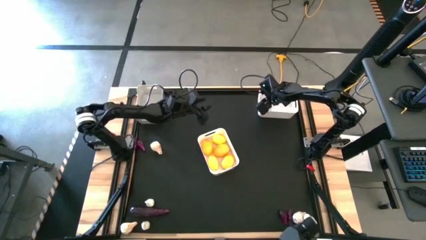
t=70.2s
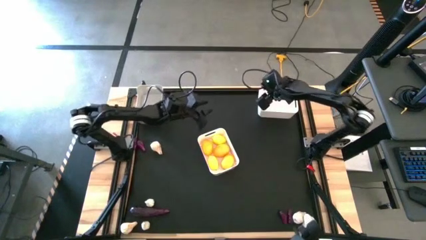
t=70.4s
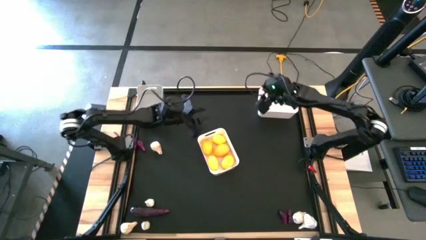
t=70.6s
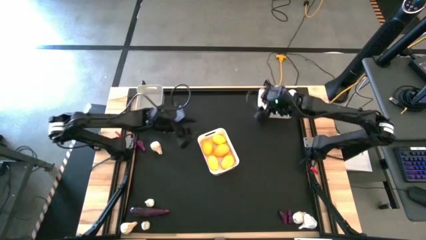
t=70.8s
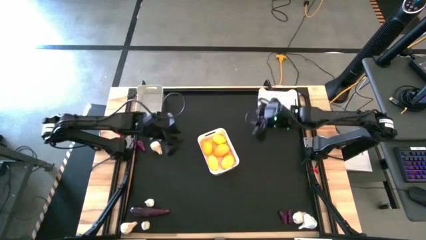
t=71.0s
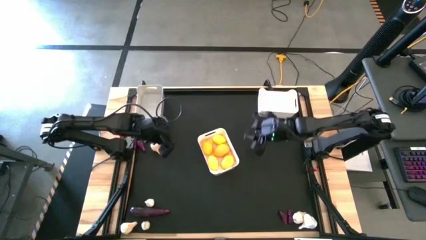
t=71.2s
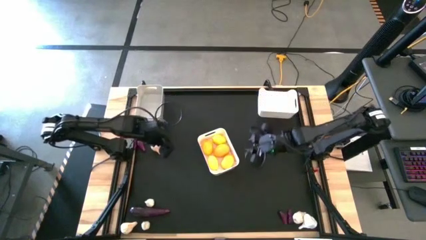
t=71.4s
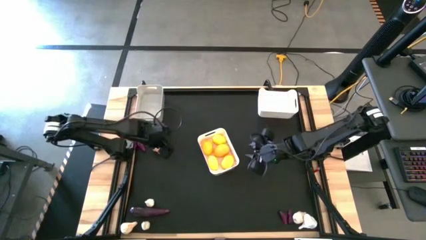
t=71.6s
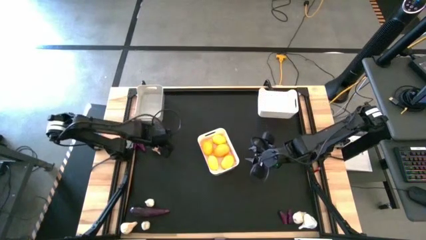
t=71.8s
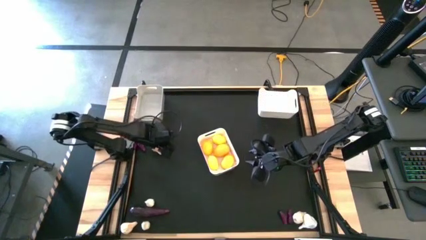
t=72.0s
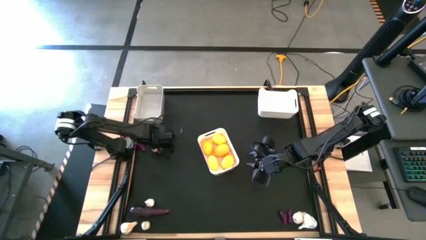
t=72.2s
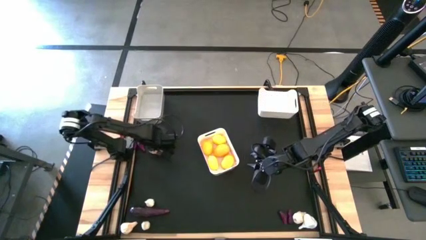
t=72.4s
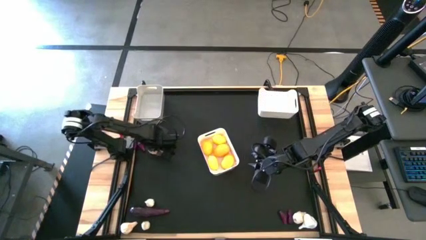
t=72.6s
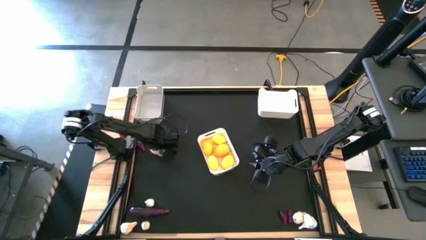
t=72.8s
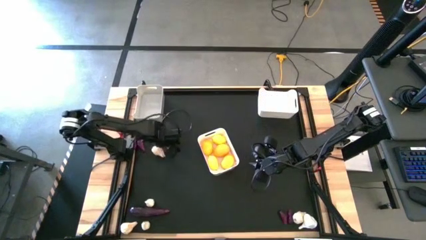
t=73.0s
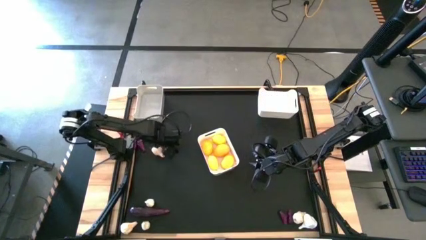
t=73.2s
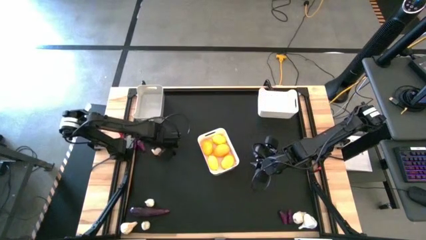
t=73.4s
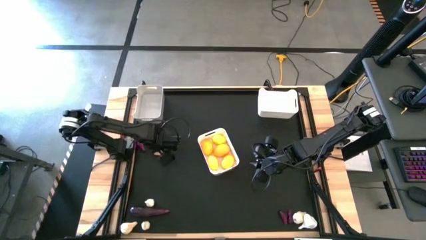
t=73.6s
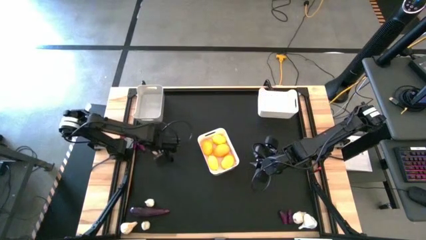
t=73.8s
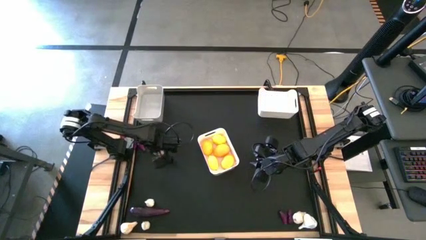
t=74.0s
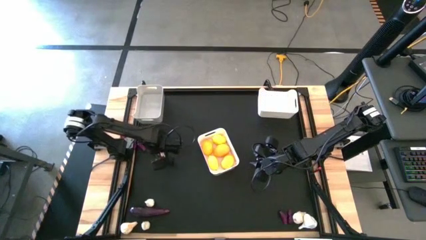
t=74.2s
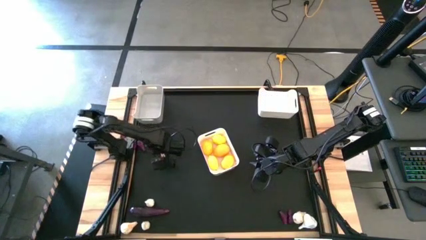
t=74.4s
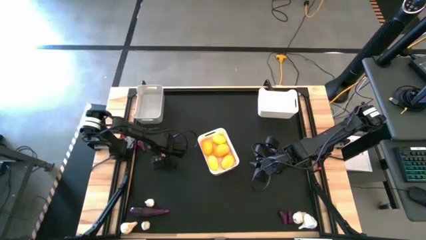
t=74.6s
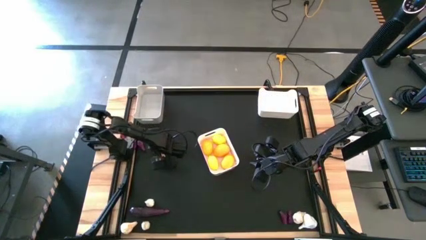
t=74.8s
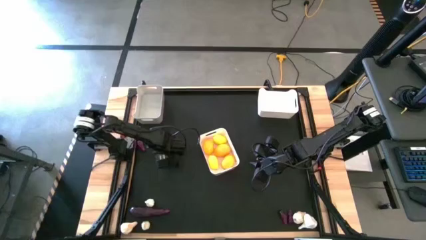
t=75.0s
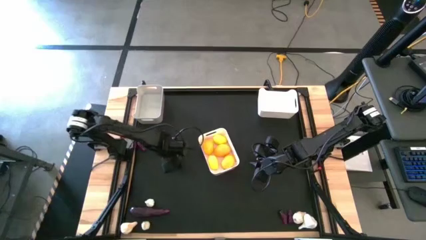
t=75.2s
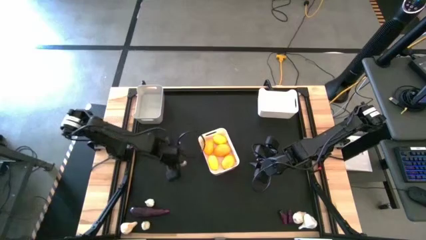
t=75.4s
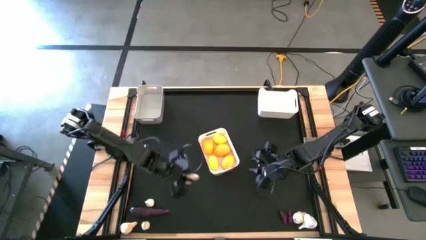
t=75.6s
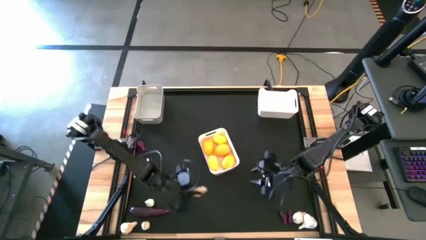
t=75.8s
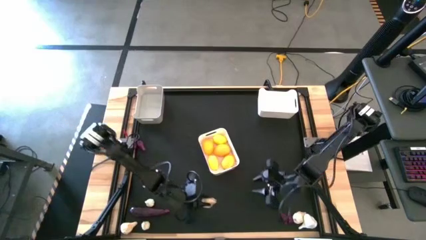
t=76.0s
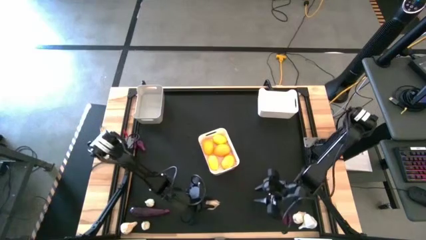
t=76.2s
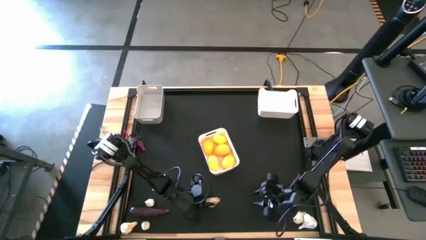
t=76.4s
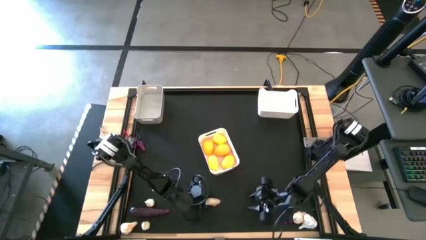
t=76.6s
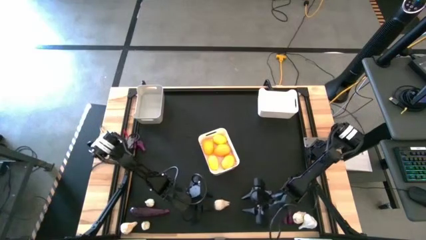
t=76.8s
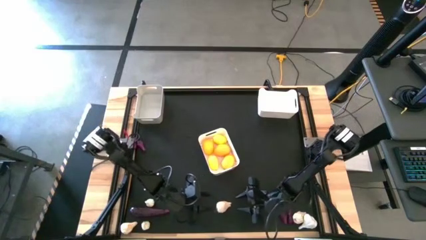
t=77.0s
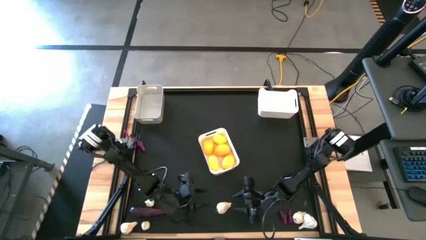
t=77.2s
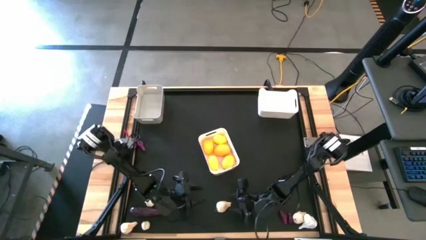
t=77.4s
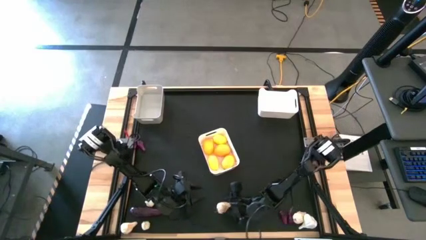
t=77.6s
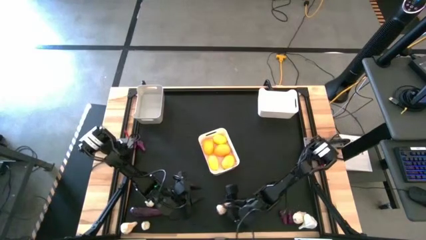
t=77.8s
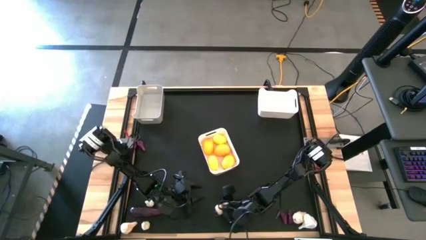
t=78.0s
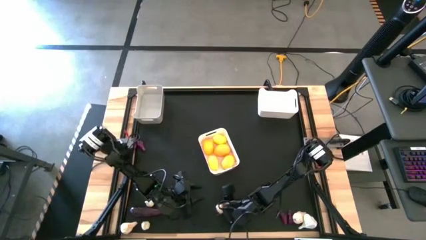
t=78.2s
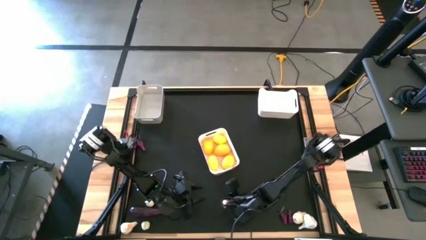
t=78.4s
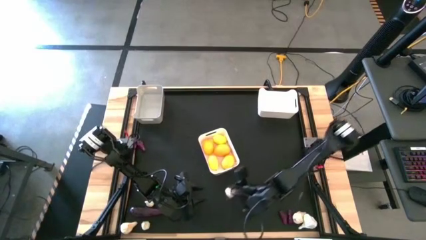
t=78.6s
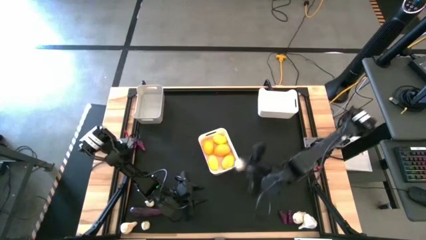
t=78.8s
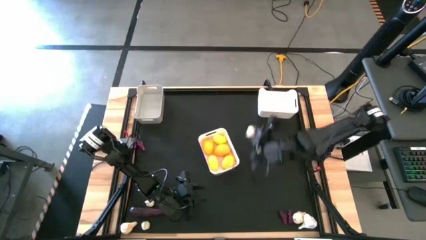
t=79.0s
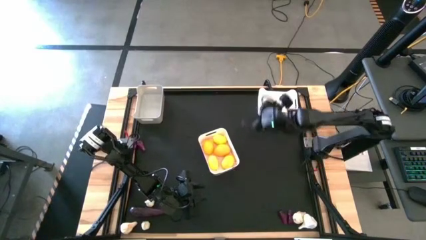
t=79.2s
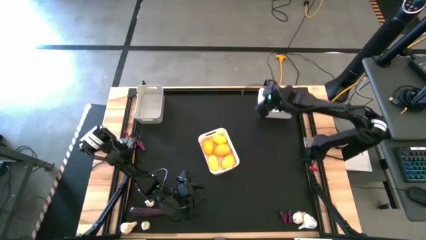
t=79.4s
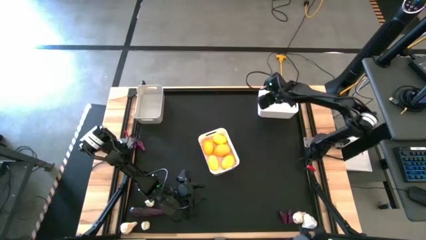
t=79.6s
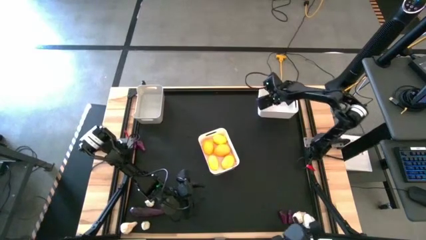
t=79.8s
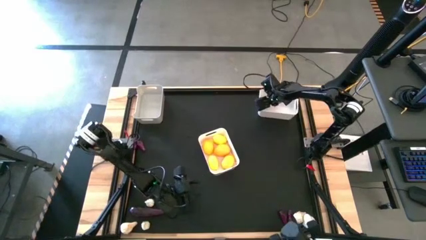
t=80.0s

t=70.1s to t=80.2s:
Task: Sort produce into baskets
Put the garlic into the top white bin

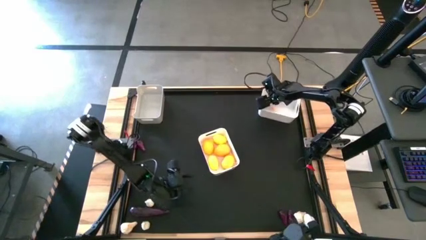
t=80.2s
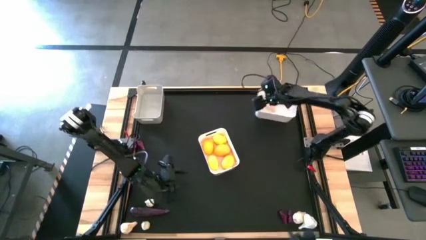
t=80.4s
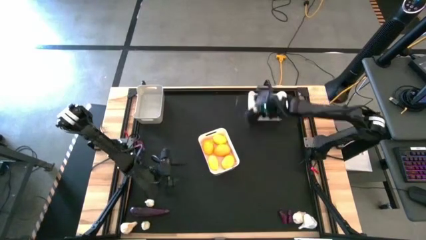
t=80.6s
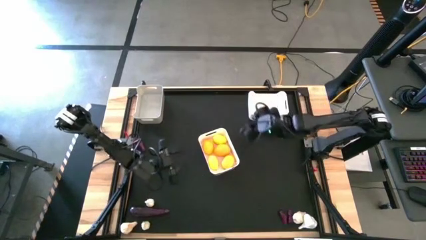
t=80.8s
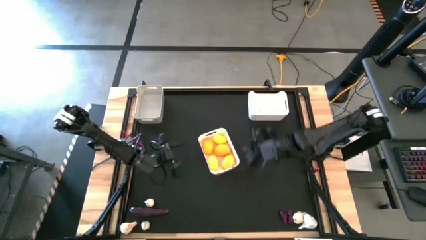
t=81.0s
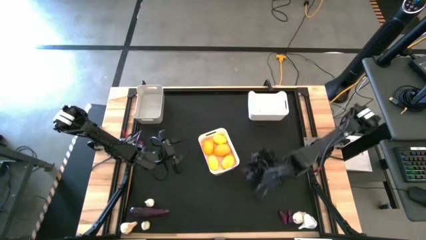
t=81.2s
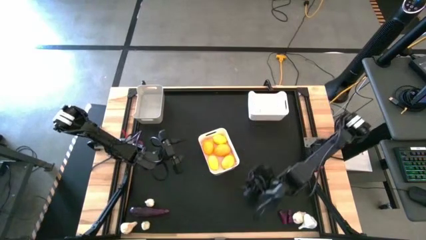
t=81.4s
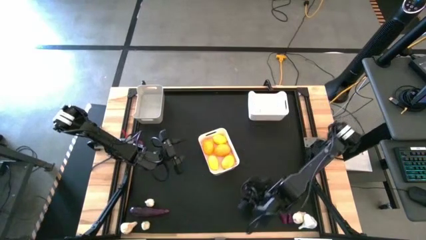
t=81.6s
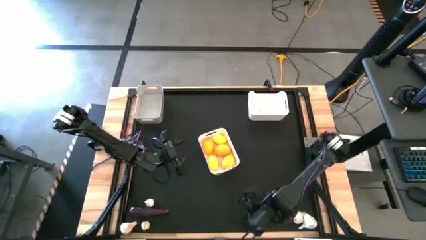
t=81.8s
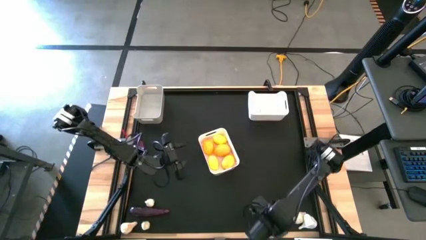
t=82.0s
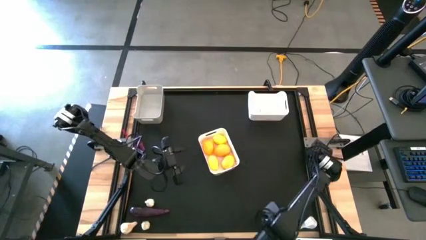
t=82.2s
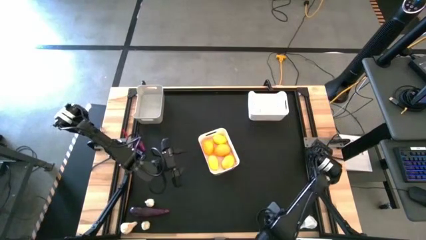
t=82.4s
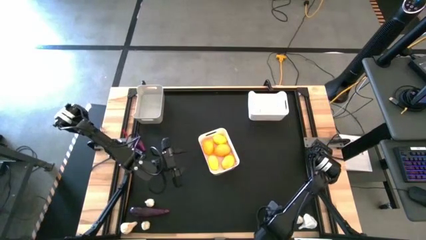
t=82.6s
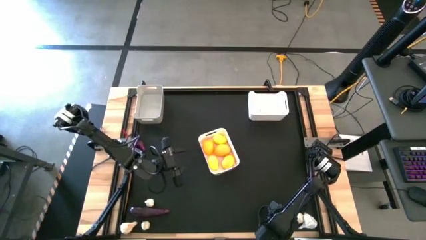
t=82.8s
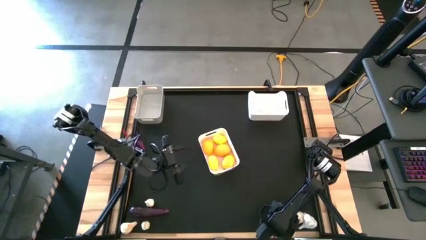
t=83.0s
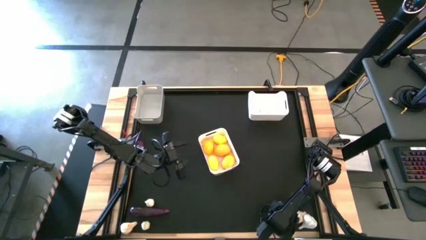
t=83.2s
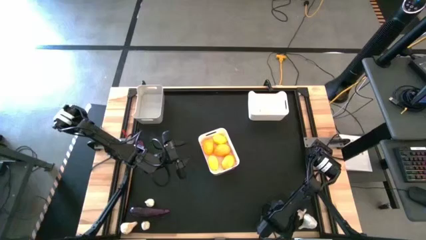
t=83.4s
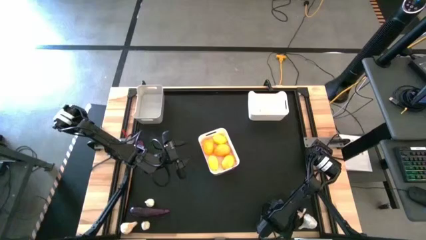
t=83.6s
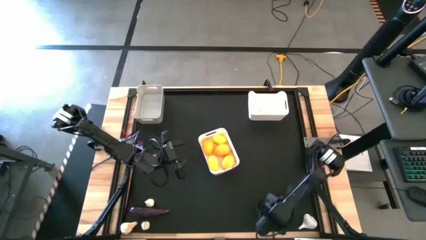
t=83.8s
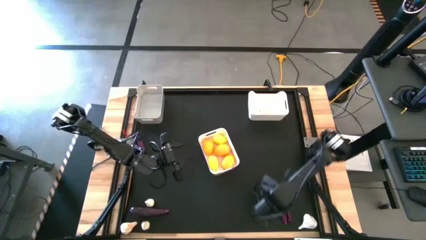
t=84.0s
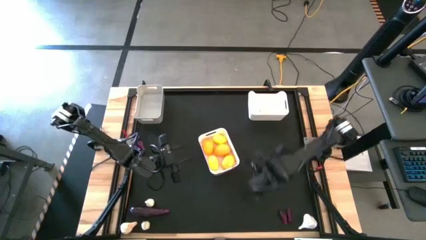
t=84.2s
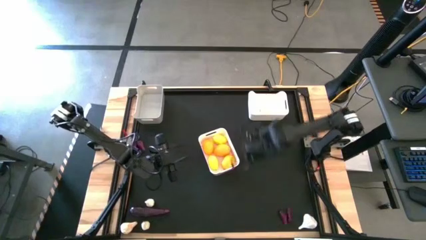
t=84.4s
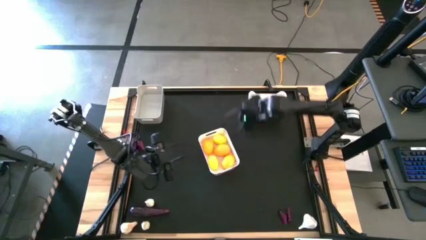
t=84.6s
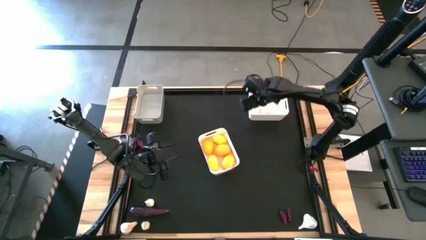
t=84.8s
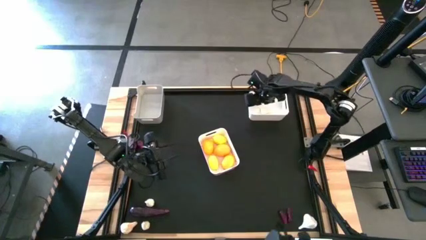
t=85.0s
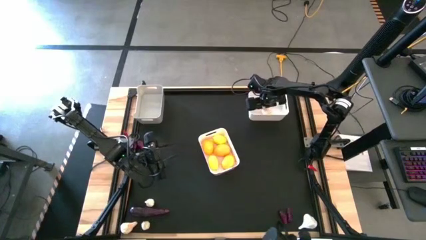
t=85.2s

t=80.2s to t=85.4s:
Put the garlic into the top white bin

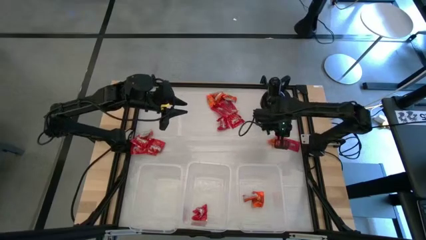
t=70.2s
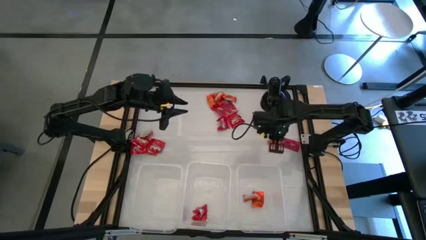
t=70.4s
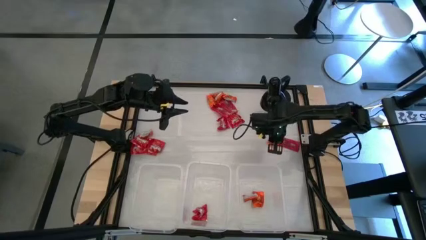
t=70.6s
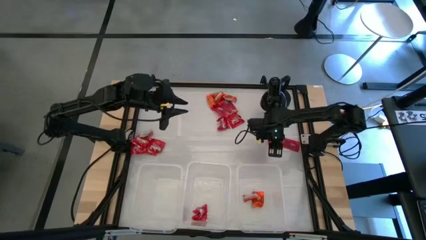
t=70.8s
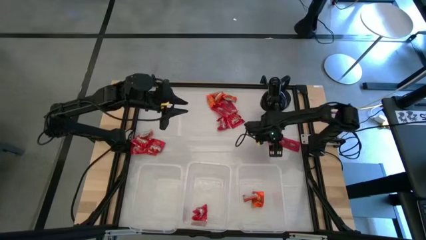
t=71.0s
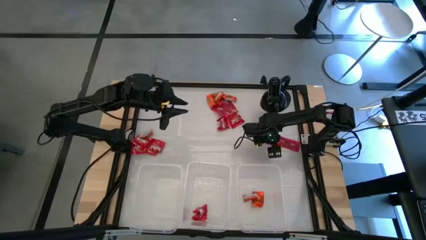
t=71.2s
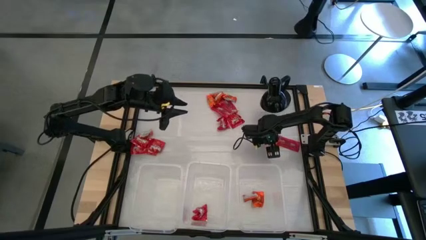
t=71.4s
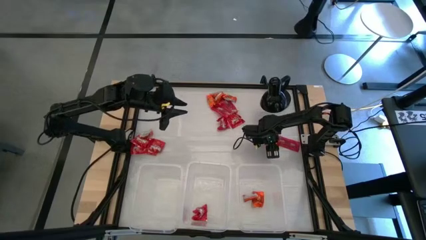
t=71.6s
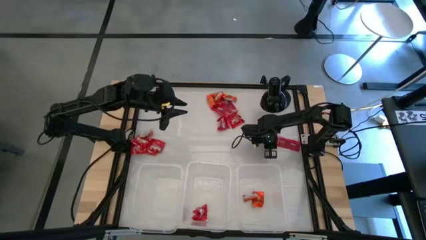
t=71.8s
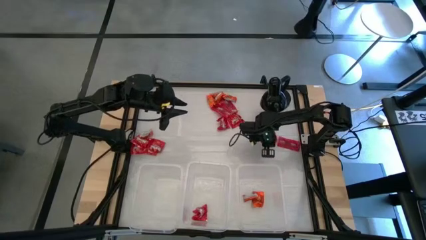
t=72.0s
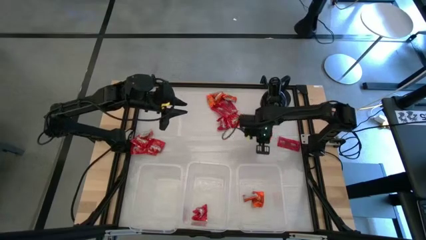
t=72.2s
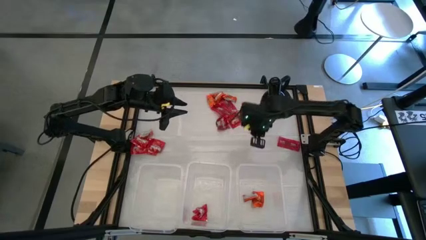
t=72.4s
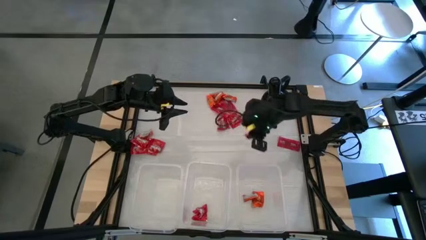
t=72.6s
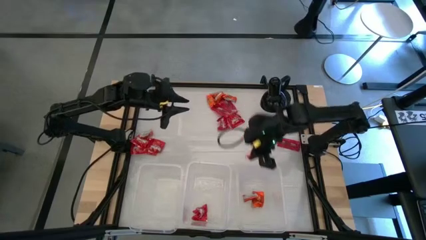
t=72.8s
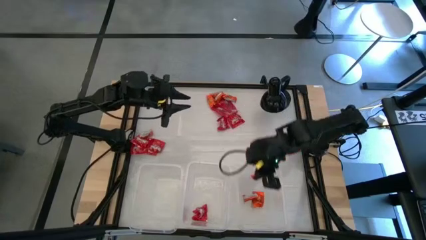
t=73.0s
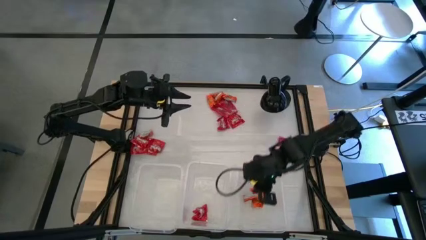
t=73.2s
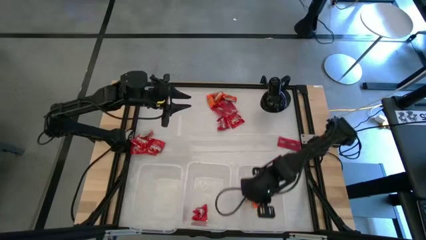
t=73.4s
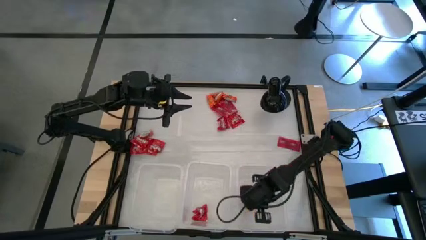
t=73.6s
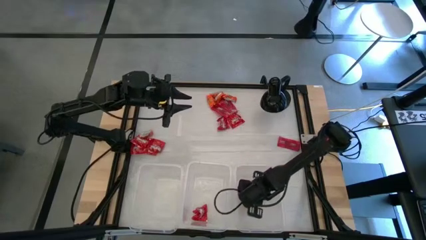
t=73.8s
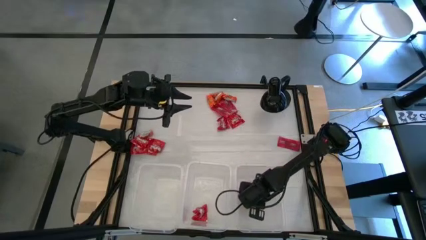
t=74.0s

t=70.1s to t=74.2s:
Task: Sort candy
Put the orange candy into the right transparent bin
